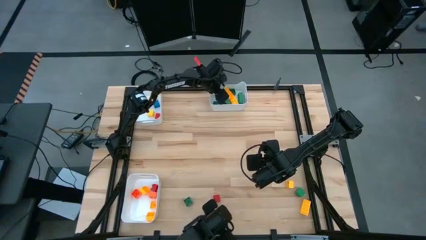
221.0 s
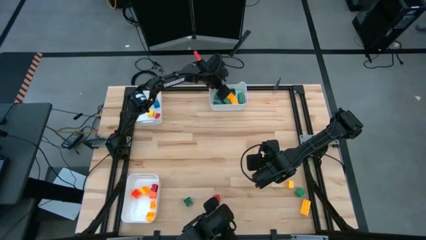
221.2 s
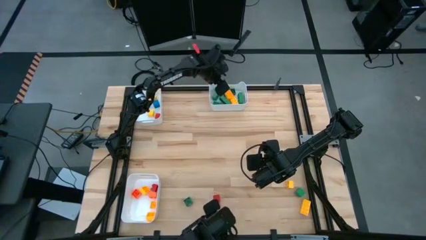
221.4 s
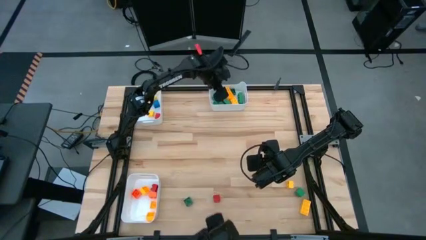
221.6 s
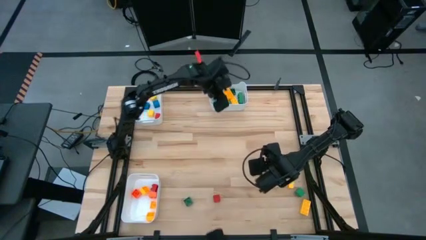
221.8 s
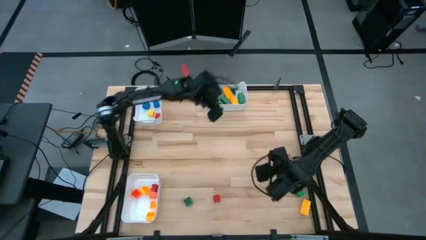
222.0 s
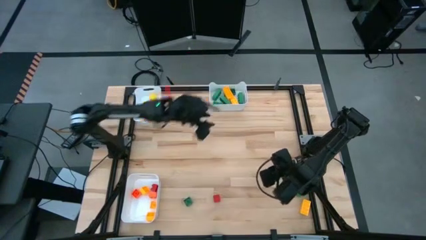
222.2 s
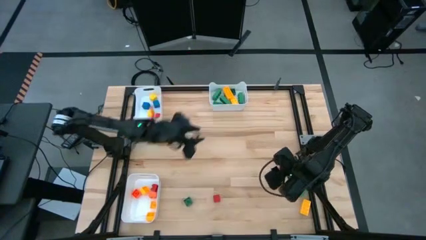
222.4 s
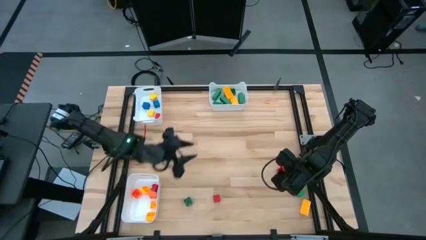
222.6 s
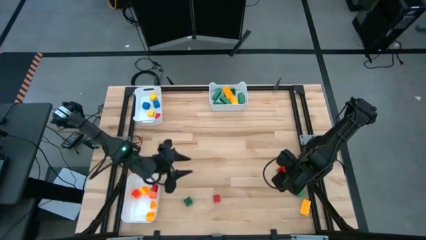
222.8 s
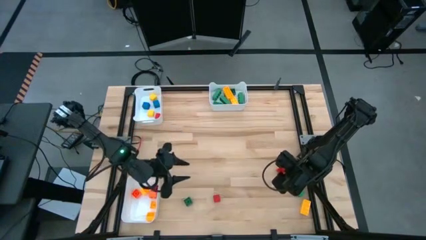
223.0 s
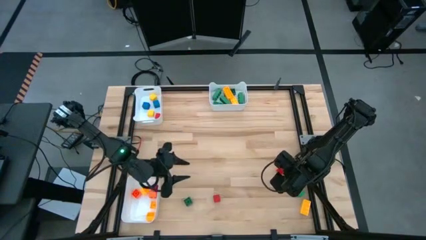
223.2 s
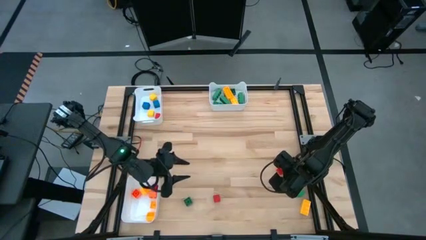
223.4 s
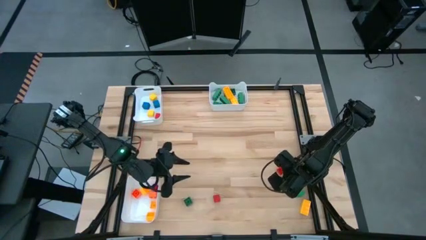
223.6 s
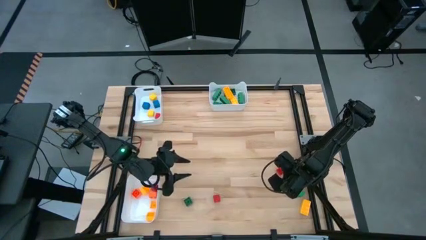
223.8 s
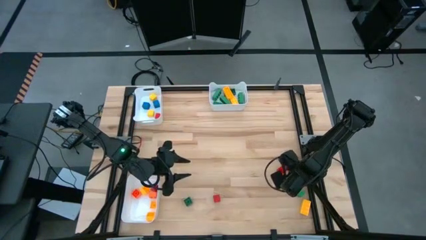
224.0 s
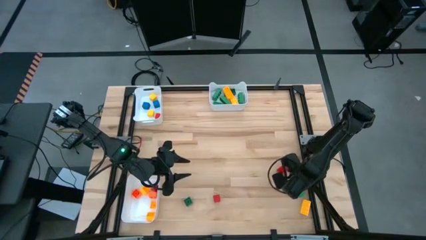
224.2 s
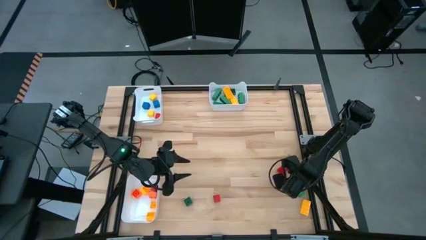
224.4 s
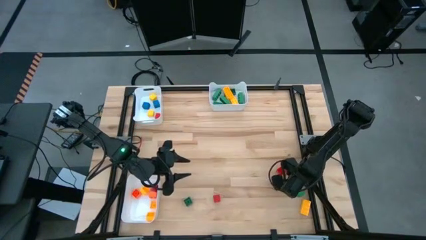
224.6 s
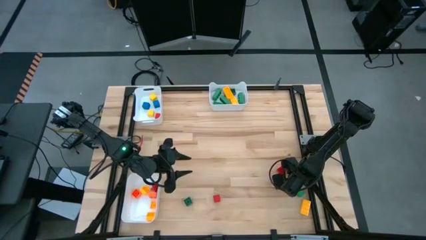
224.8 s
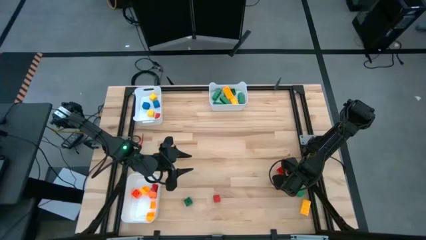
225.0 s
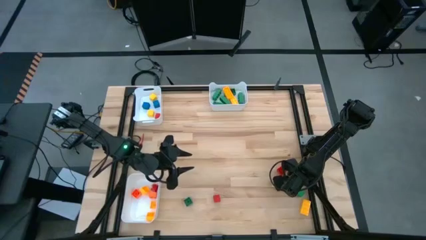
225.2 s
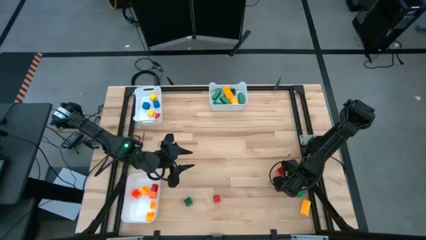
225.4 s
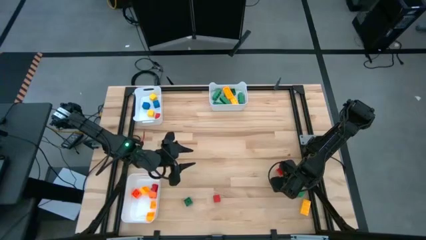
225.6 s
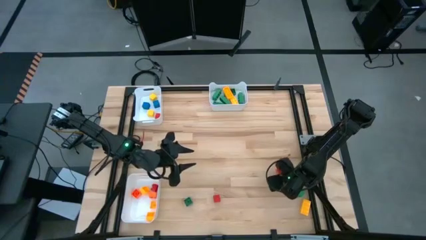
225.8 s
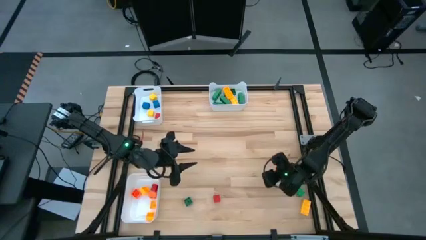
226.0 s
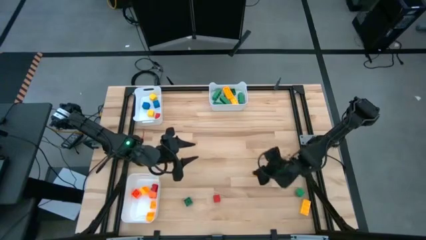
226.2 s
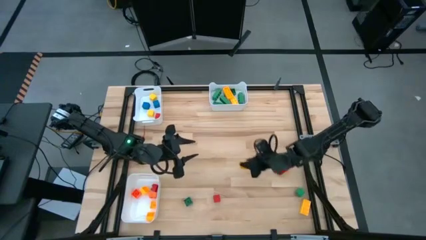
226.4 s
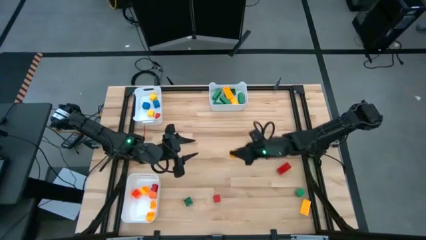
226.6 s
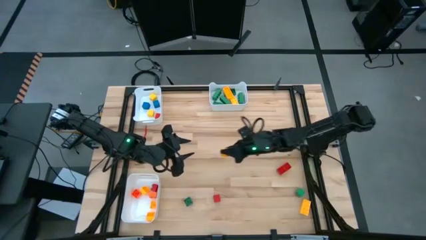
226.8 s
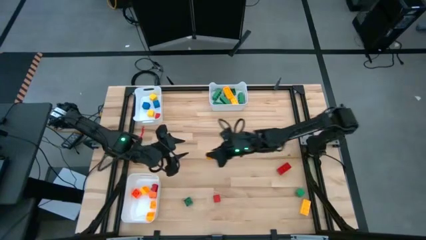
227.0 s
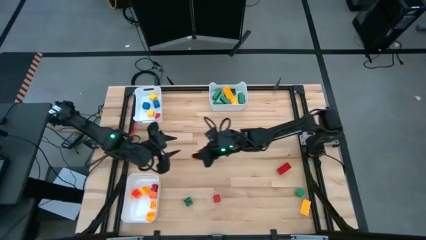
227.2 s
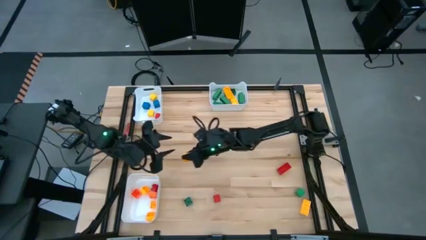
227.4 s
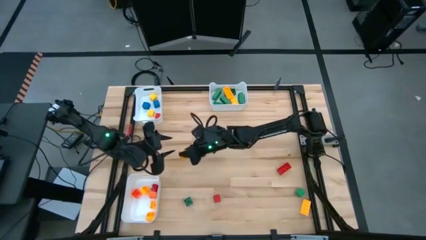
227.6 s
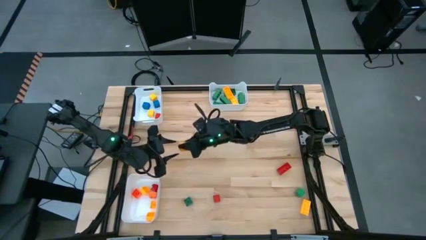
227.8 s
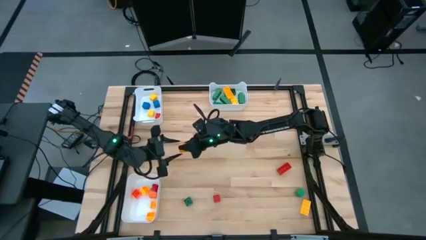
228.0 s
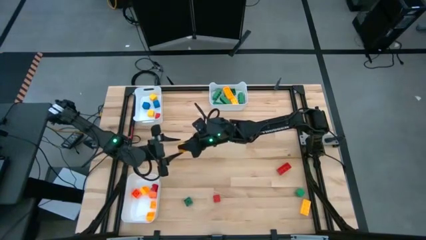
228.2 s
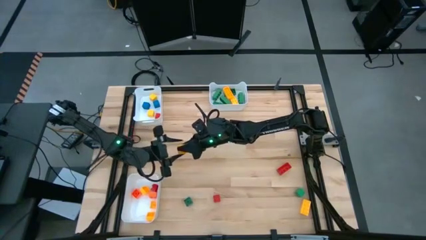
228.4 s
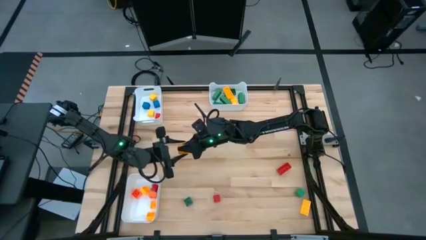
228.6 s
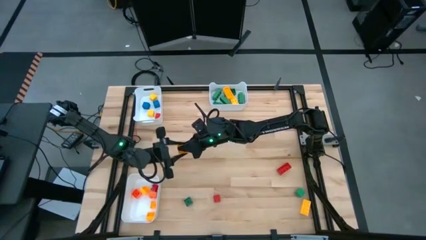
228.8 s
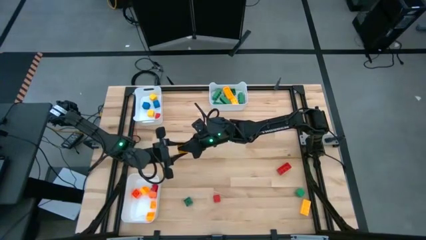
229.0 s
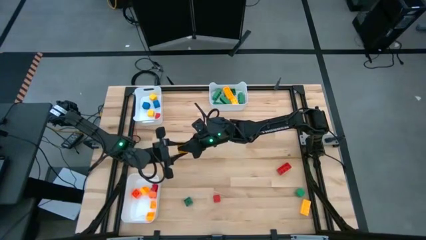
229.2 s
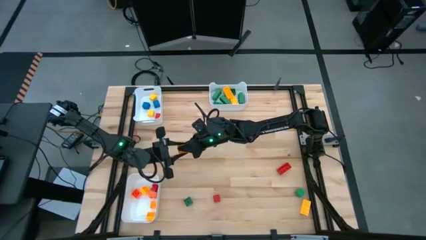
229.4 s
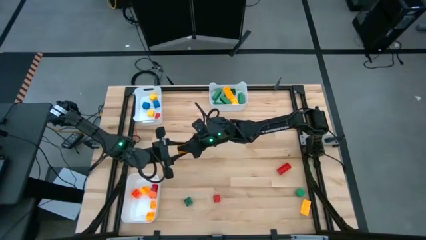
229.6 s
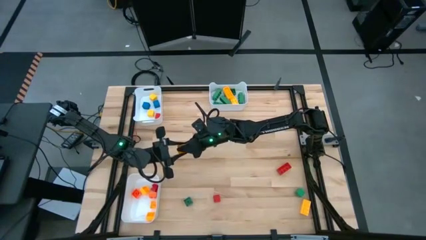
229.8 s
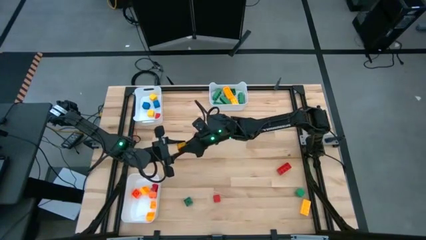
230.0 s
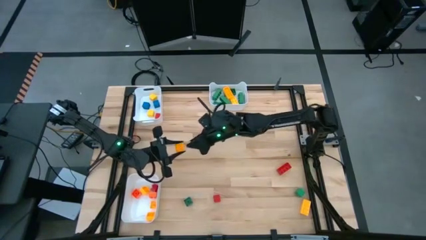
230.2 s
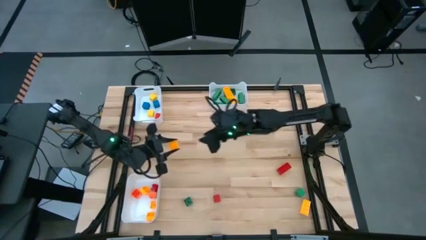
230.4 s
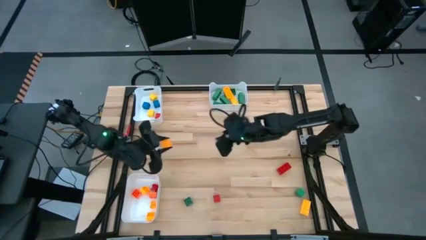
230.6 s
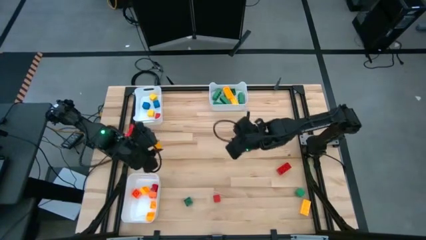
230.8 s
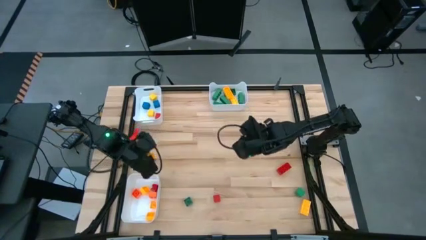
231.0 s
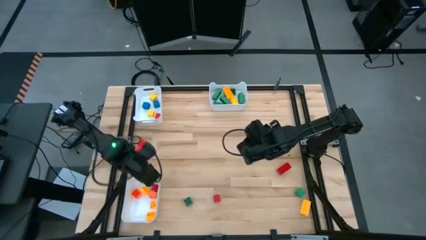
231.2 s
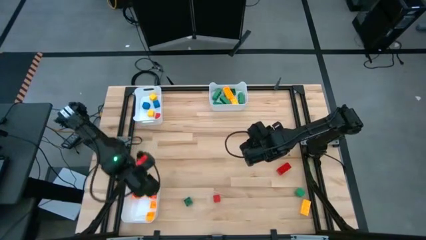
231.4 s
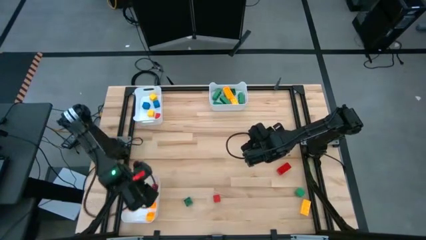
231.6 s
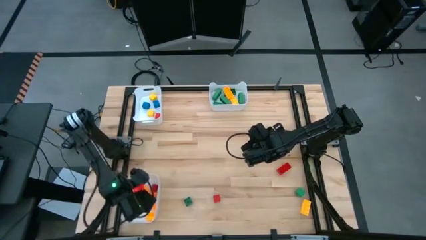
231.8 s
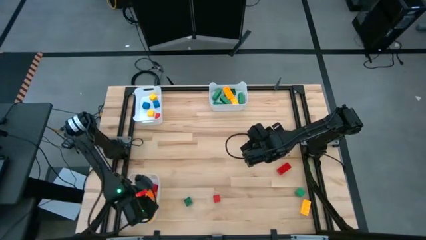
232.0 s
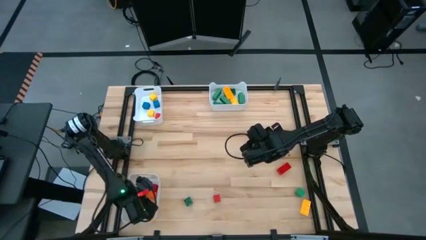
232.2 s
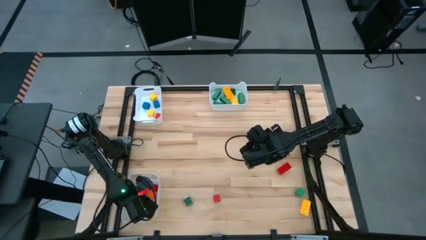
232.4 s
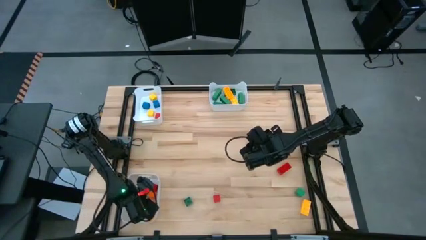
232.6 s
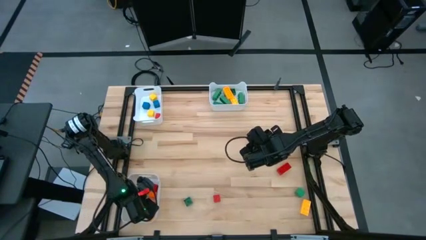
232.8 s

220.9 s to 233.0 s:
Task: Sort blocks by size
Put the yellow 4 stud game piece into the bottom white bin

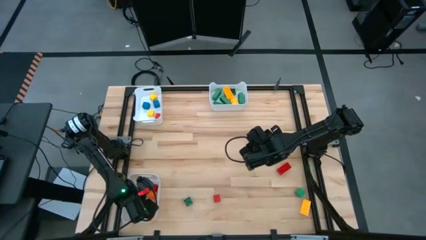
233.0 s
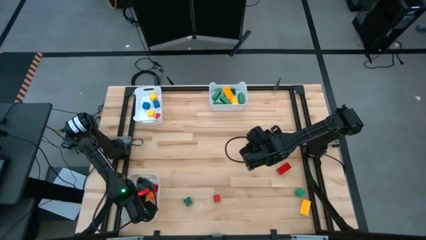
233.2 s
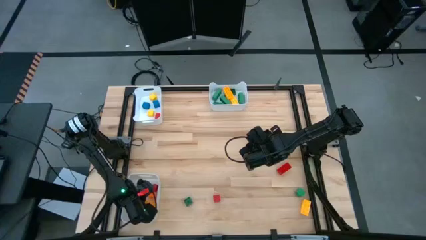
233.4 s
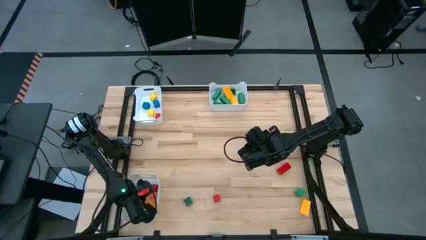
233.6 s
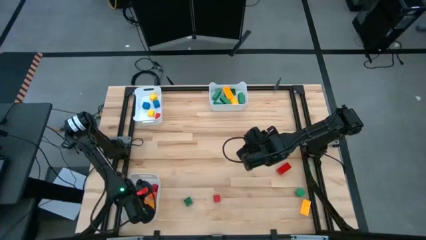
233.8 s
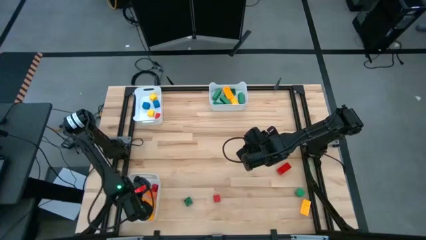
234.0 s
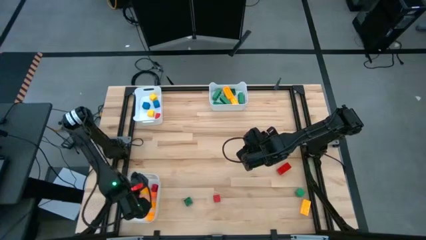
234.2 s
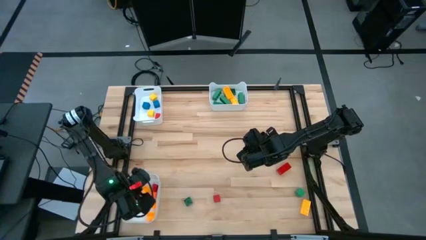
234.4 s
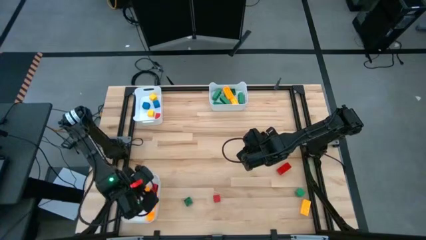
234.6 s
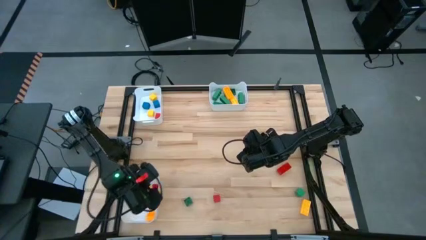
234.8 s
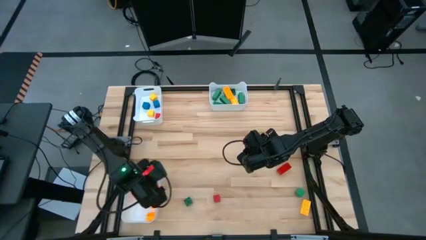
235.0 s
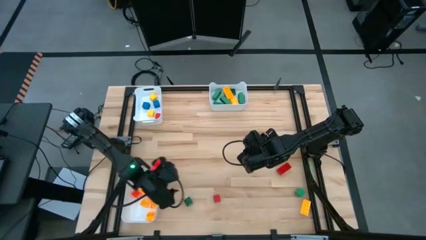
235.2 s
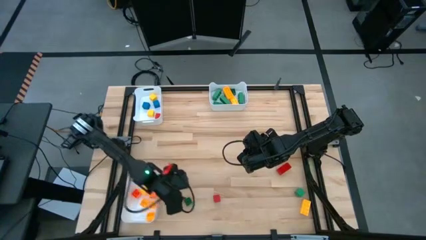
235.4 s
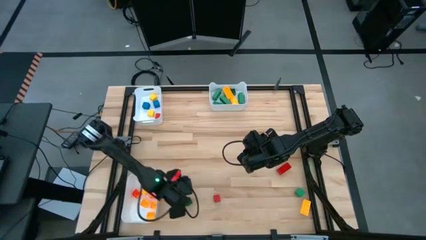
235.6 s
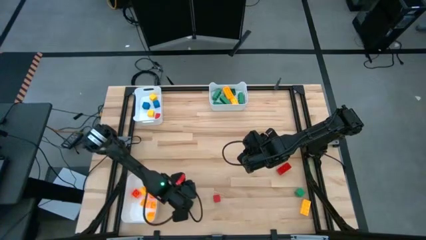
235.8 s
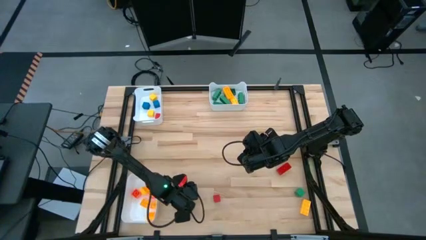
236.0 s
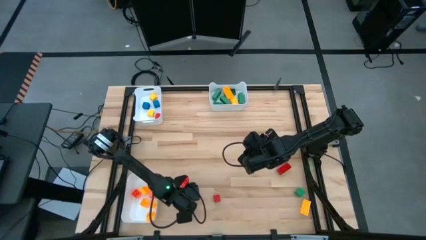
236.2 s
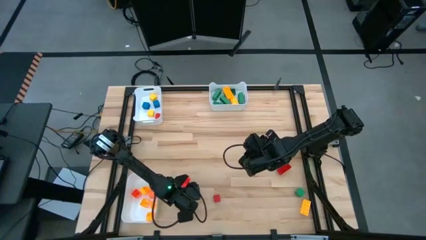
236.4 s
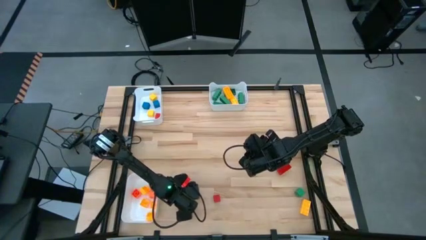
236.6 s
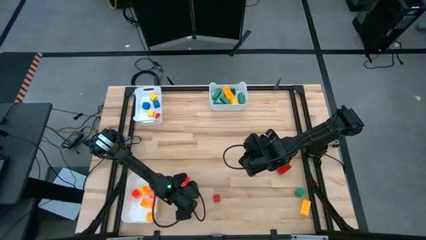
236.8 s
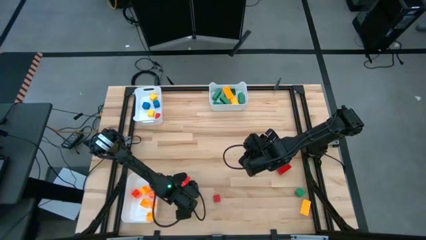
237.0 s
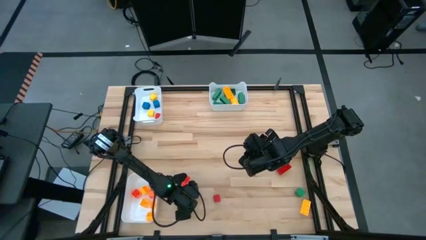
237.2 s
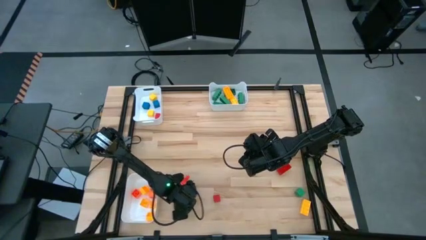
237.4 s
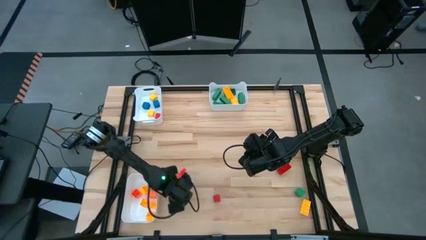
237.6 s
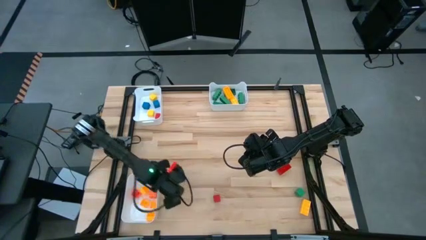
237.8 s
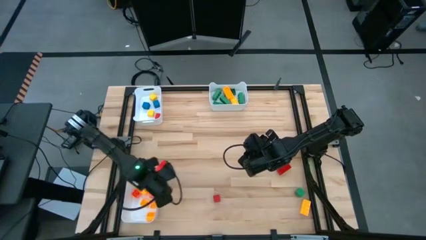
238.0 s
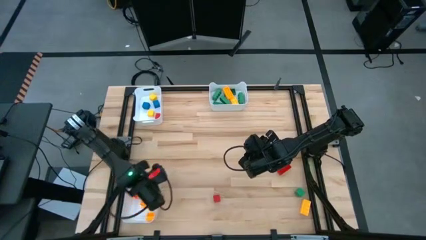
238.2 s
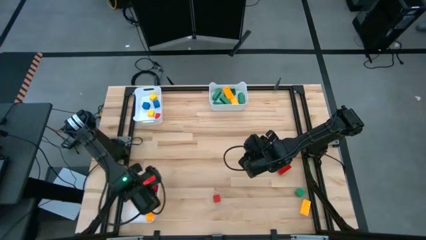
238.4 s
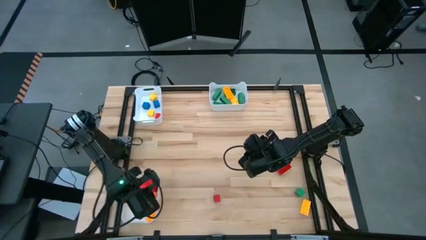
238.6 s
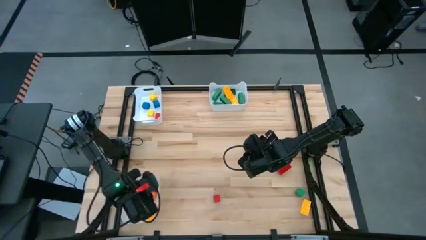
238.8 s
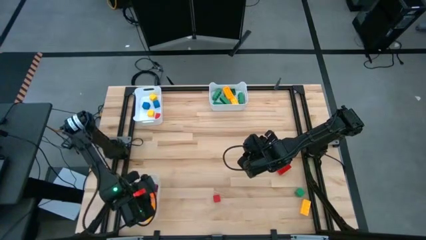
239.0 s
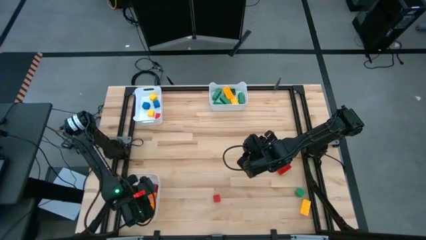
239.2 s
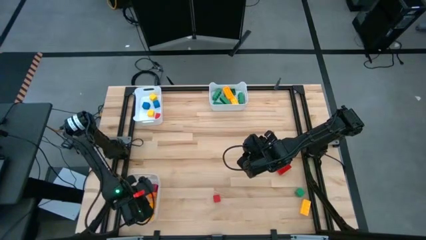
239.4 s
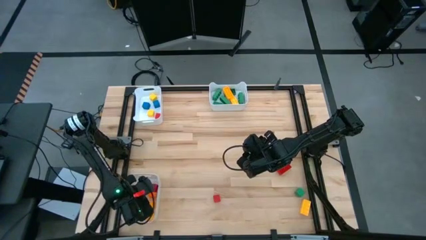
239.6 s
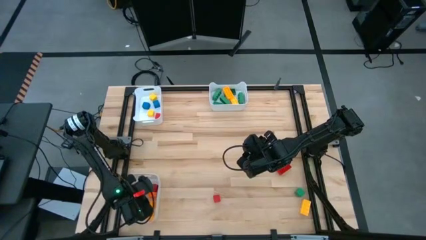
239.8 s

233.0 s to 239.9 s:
Put the green 4 stud game piece into the bottom white bin
